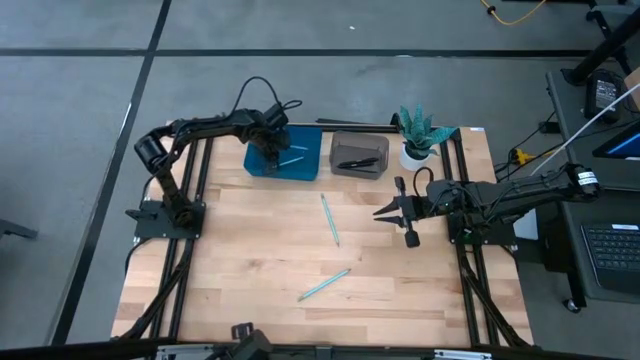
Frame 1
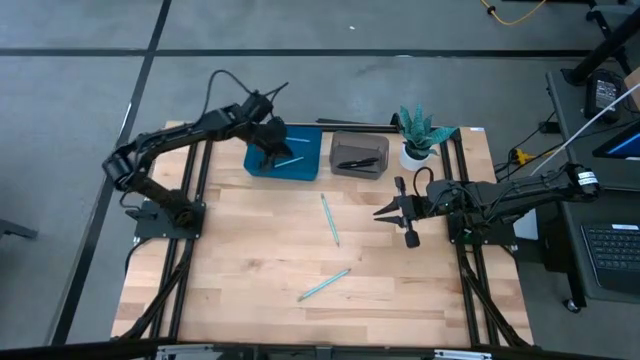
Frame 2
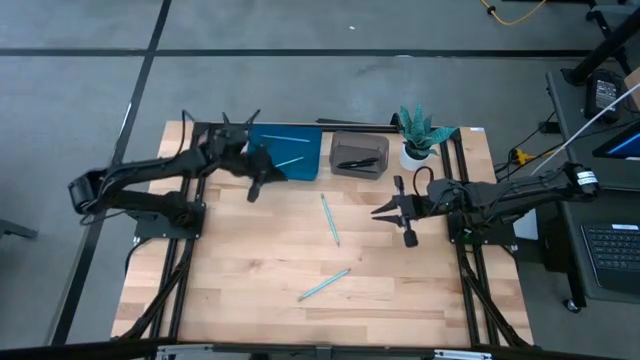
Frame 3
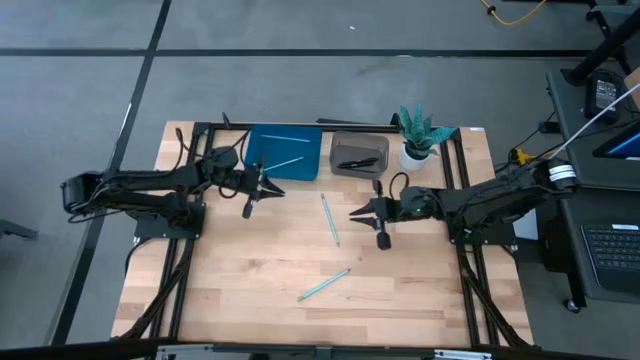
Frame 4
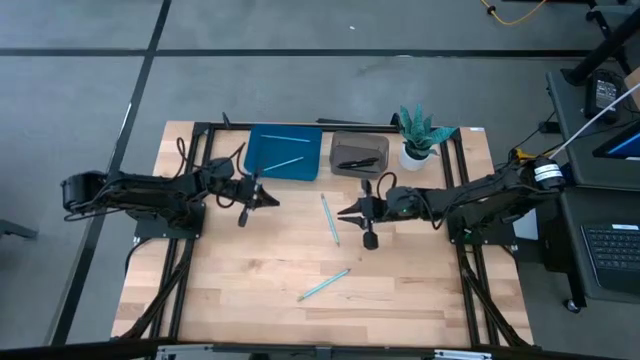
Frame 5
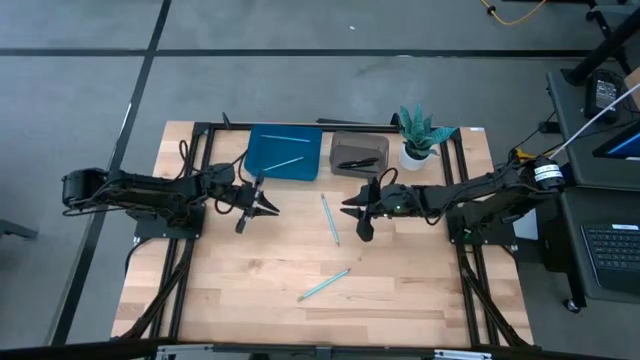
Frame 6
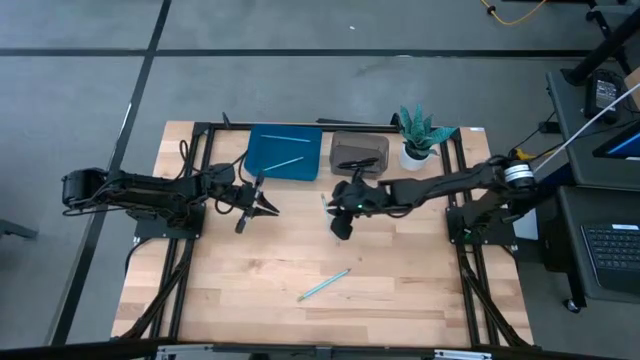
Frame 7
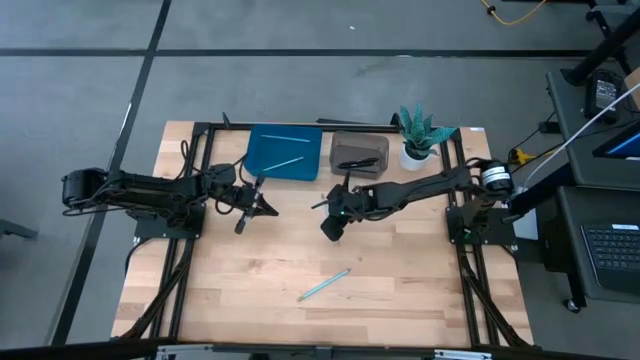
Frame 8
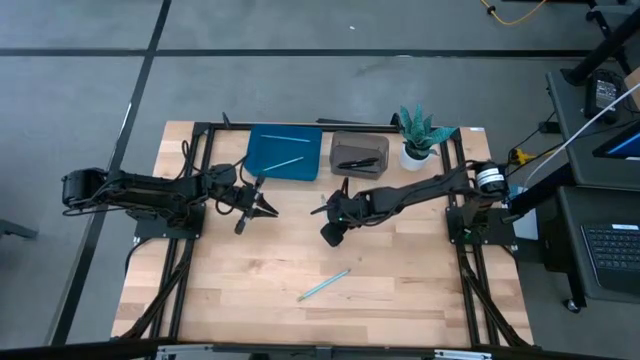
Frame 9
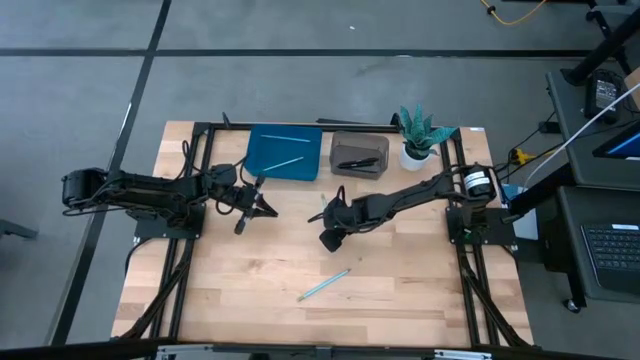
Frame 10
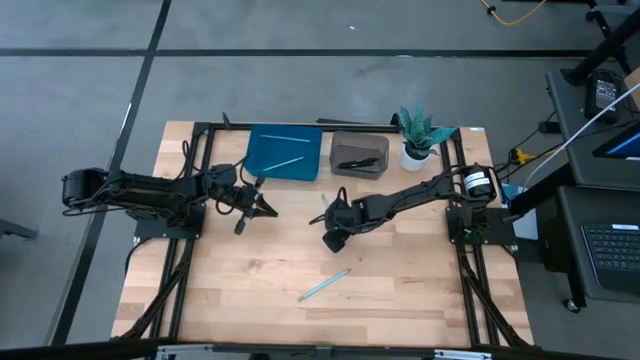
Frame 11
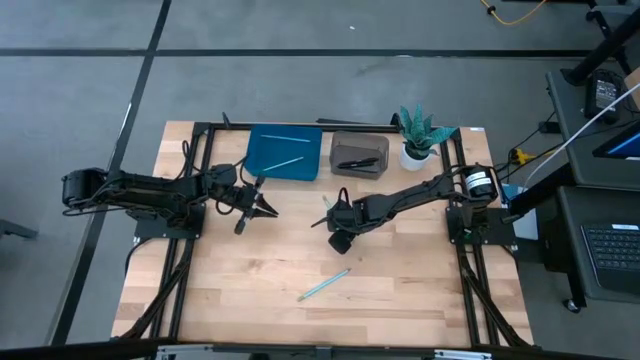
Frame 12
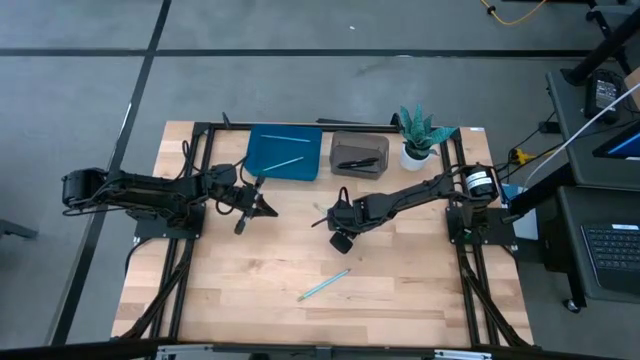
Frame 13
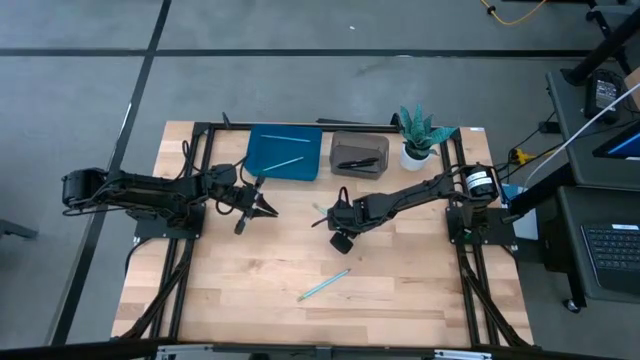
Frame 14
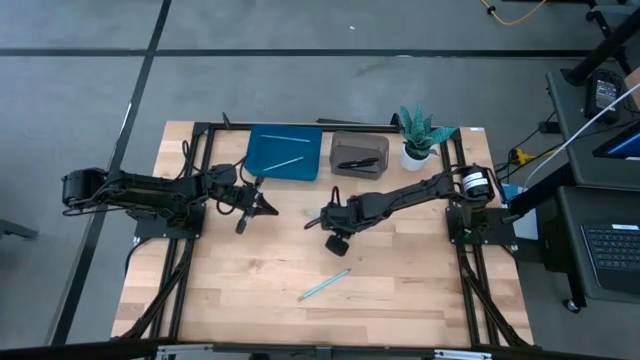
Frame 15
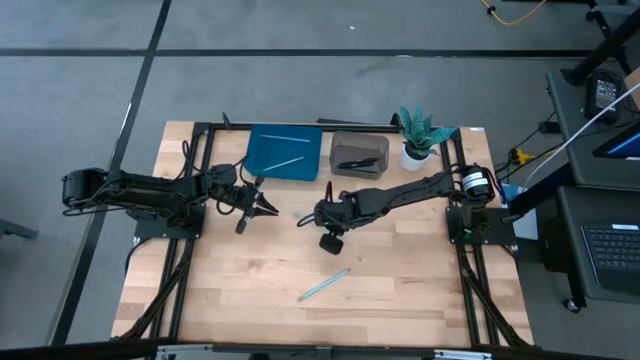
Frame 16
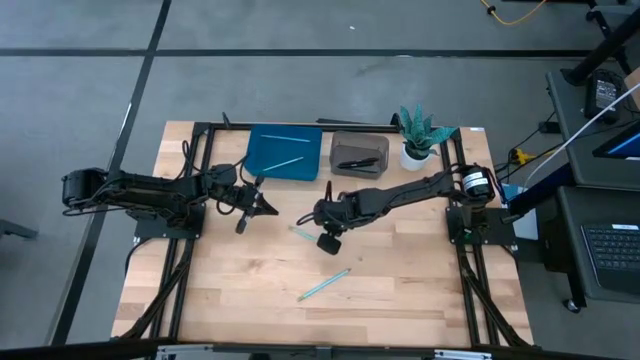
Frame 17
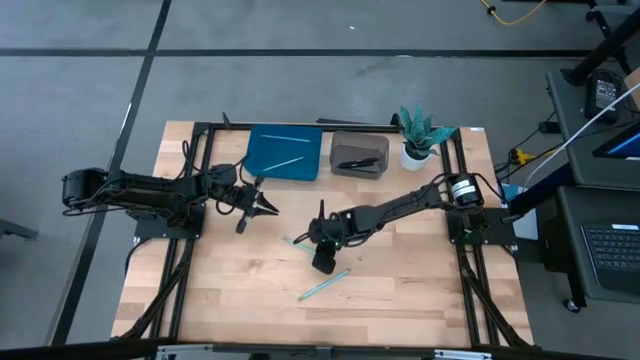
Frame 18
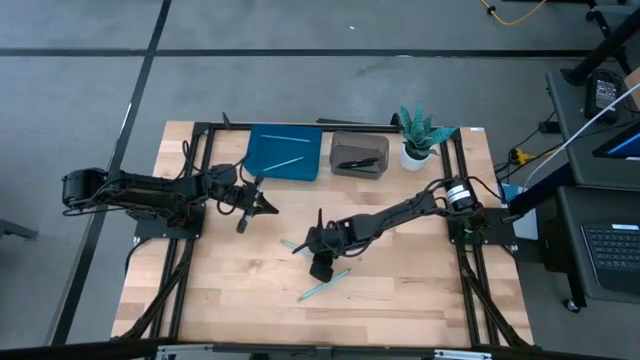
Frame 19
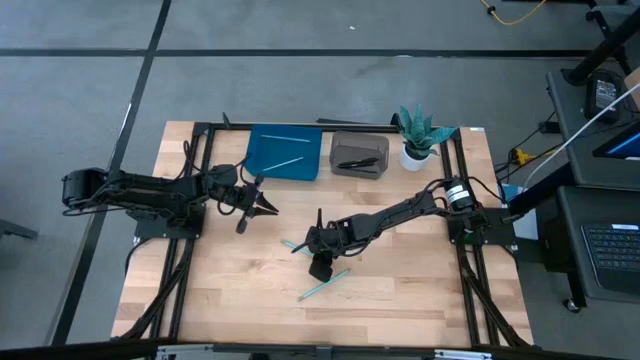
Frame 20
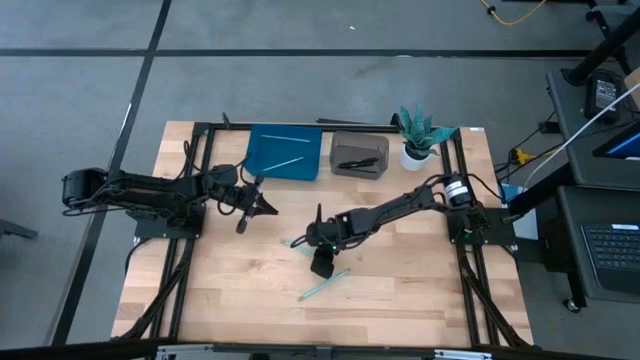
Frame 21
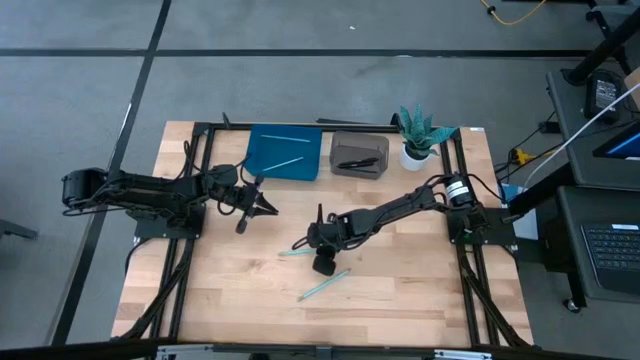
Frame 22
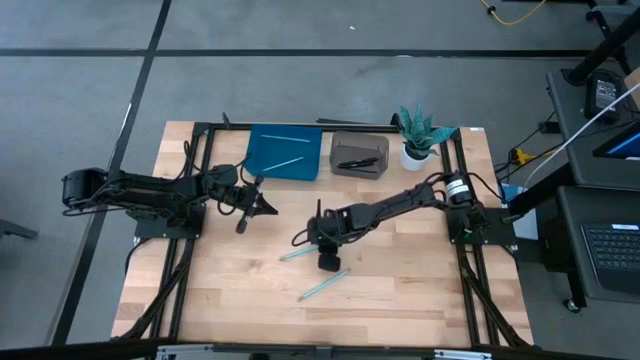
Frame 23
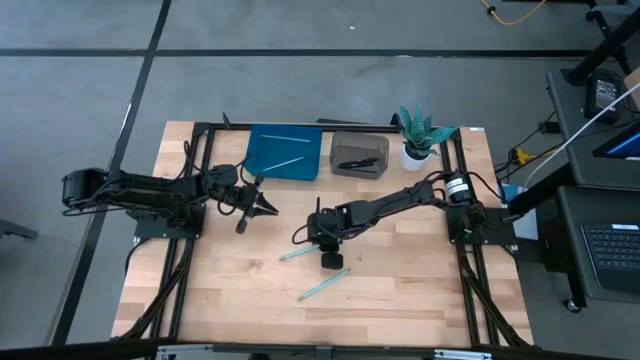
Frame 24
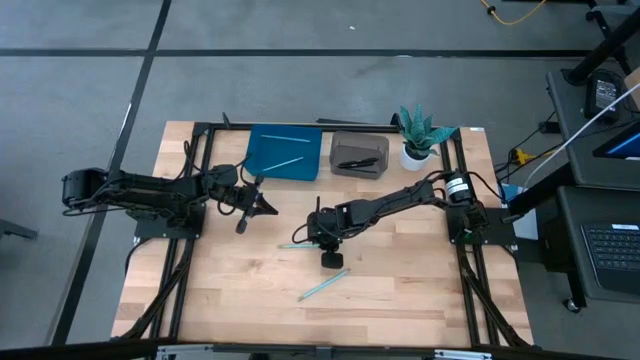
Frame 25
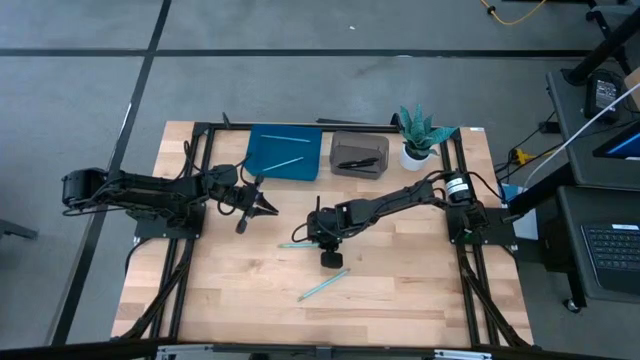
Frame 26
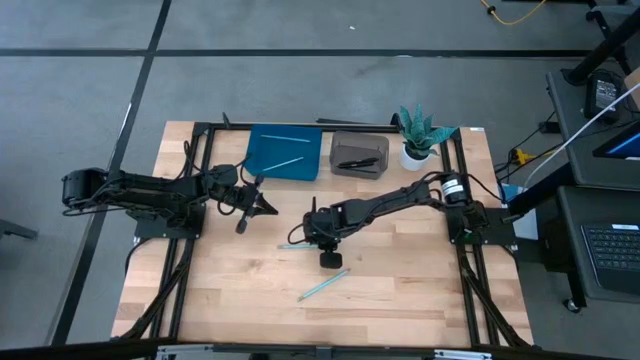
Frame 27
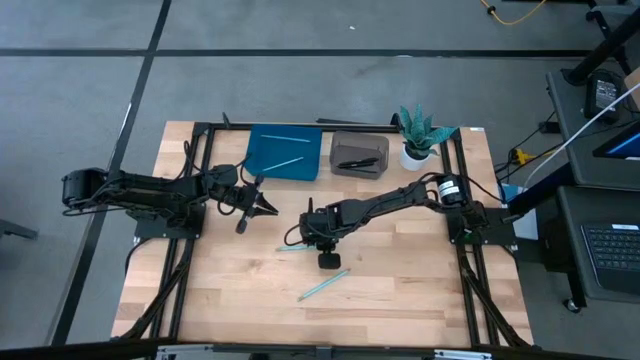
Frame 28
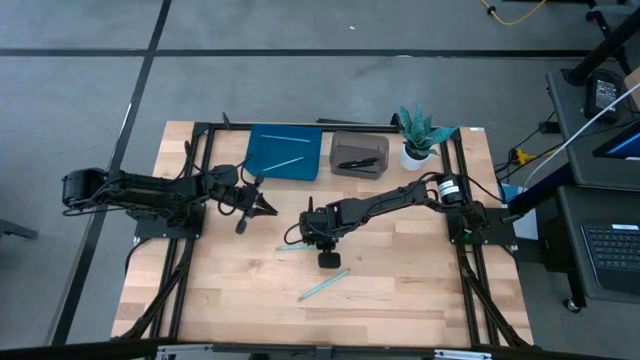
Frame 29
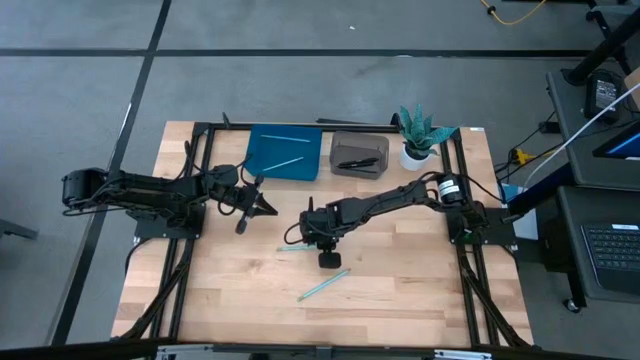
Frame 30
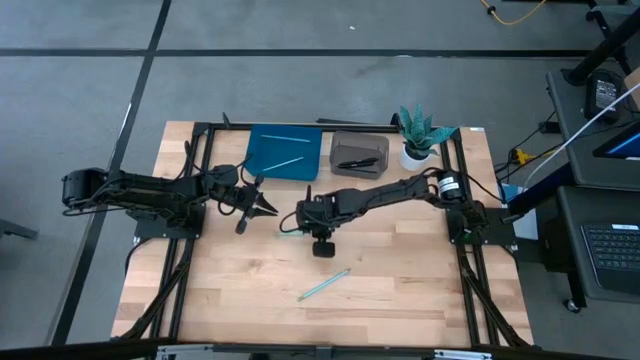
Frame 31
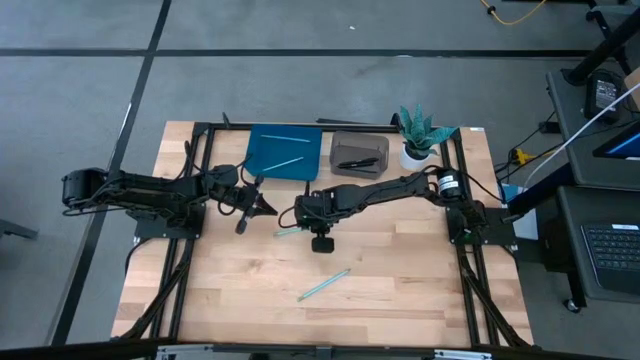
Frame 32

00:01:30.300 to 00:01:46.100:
Task: Sort pens & pencils
Put the light green pencil into the blue bin

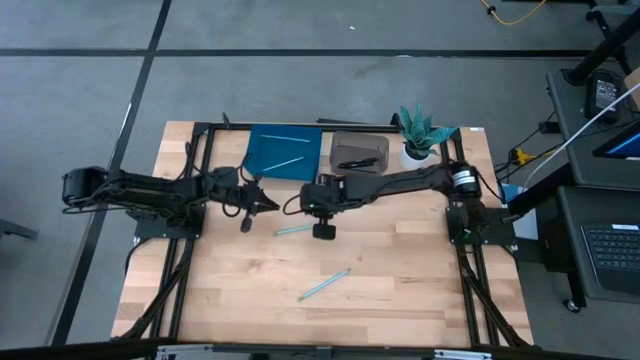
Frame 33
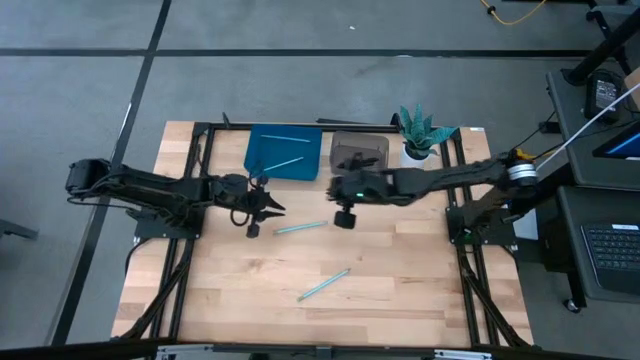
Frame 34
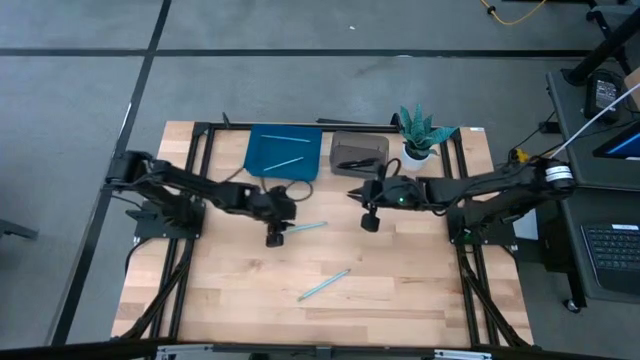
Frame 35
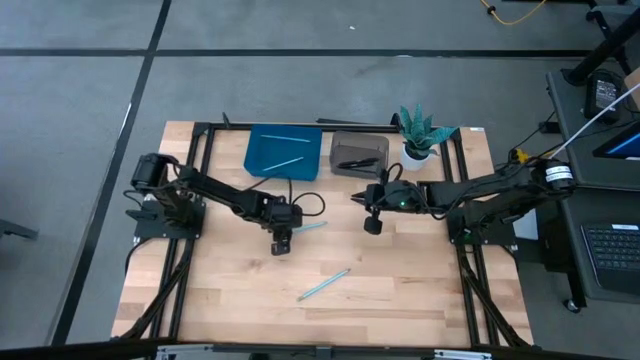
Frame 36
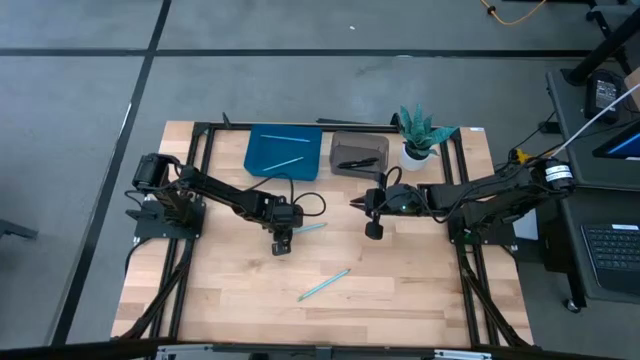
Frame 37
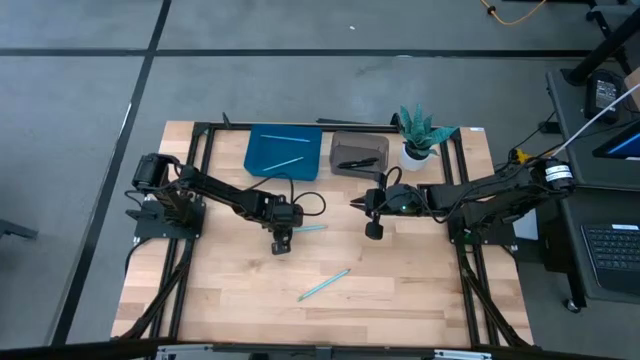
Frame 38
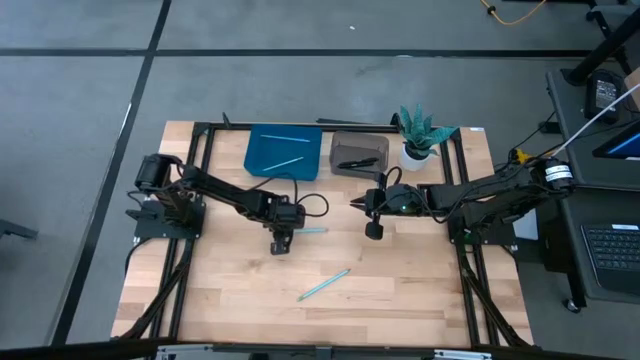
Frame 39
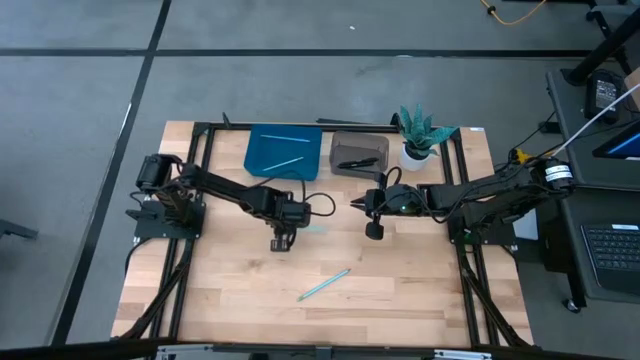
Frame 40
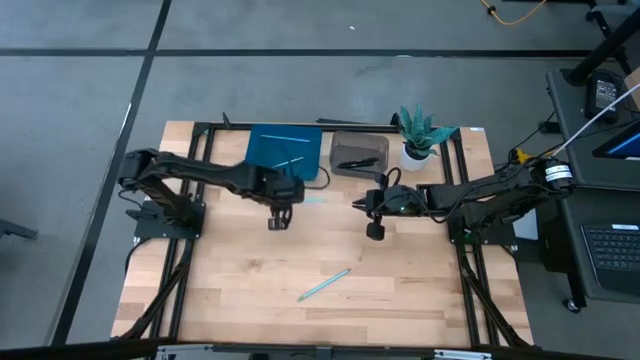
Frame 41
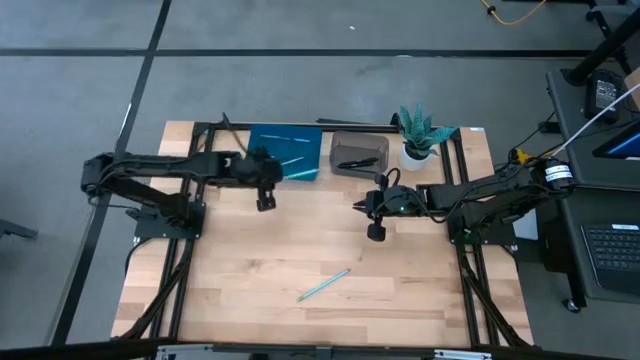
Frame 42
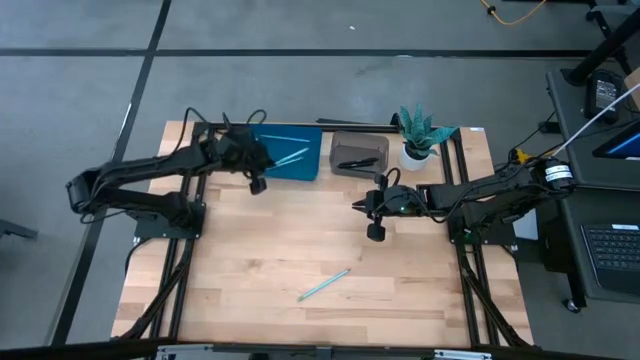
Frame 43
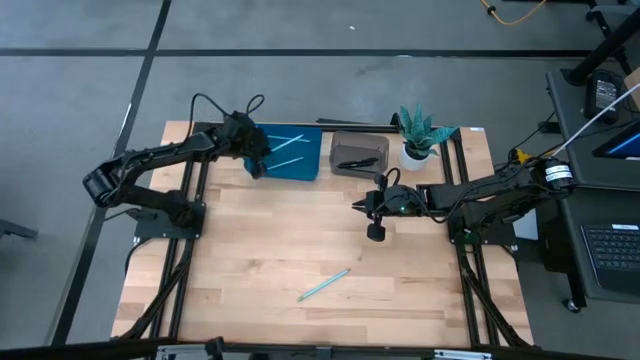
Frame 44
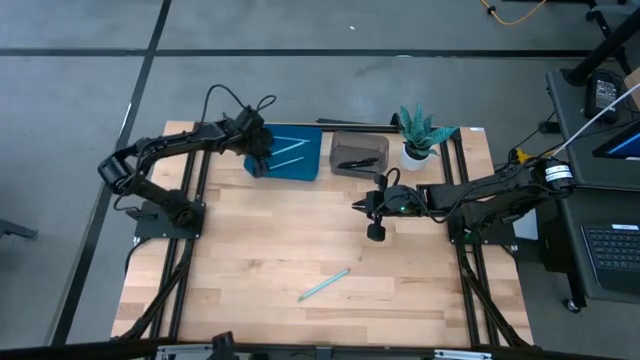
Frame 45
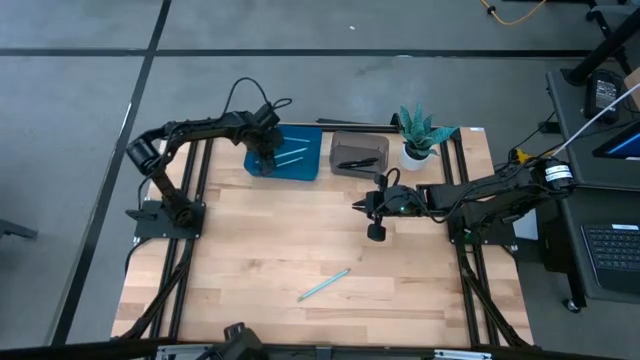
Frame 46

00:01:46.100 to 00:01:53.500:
Put the light green pencil into the blue bin
